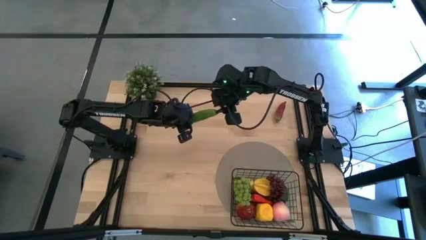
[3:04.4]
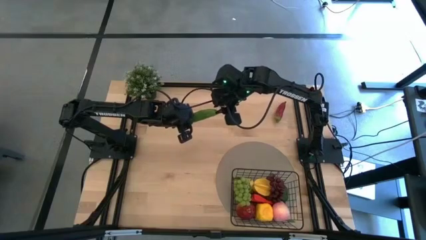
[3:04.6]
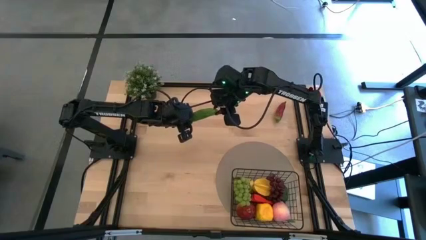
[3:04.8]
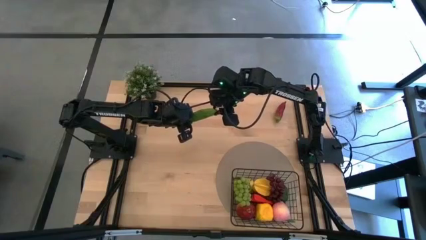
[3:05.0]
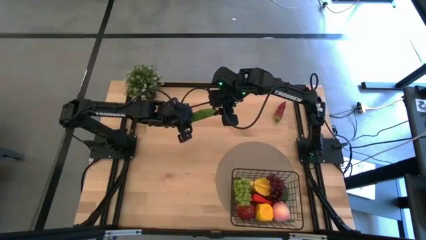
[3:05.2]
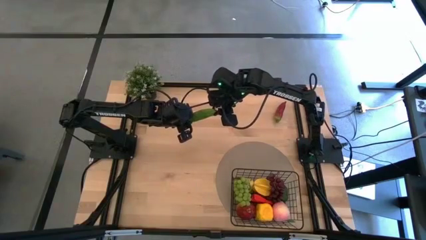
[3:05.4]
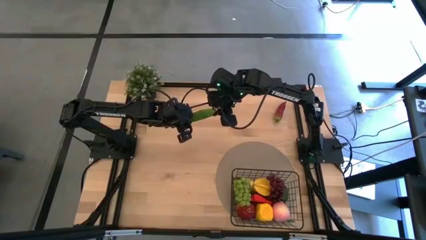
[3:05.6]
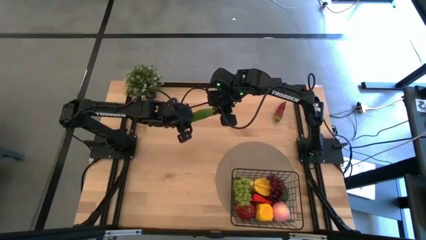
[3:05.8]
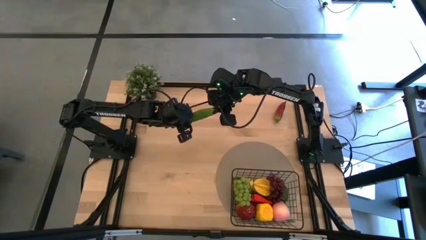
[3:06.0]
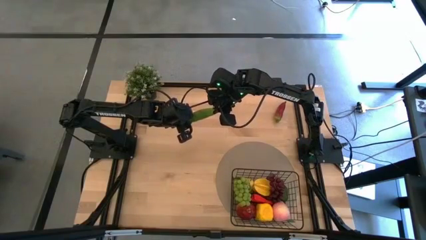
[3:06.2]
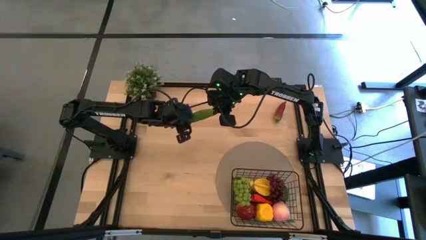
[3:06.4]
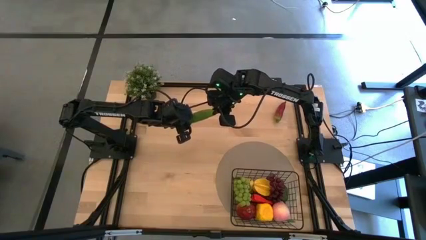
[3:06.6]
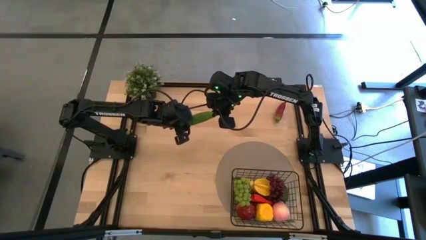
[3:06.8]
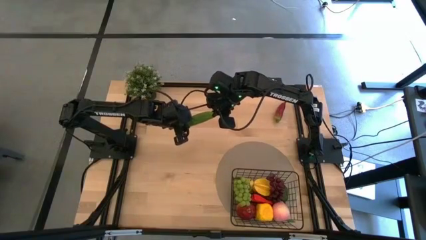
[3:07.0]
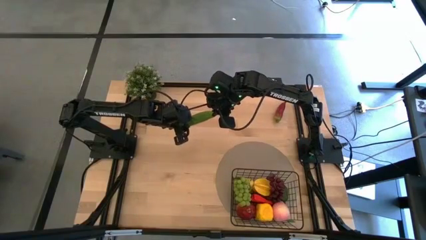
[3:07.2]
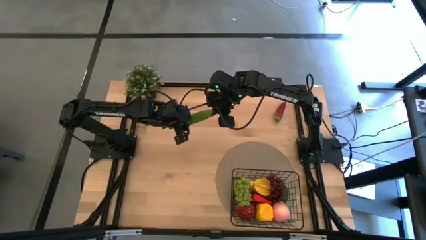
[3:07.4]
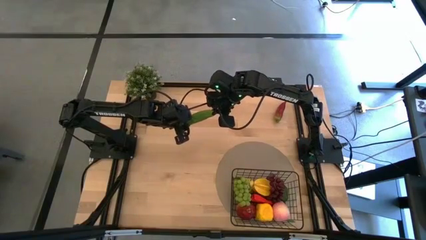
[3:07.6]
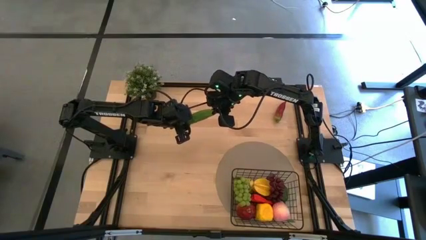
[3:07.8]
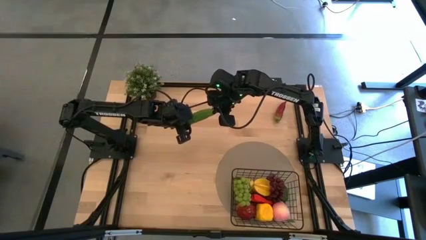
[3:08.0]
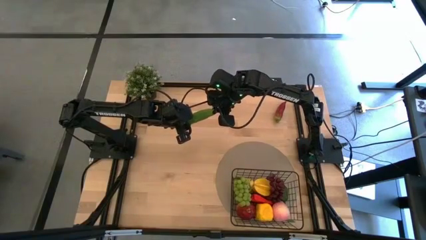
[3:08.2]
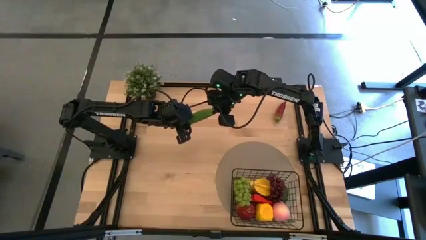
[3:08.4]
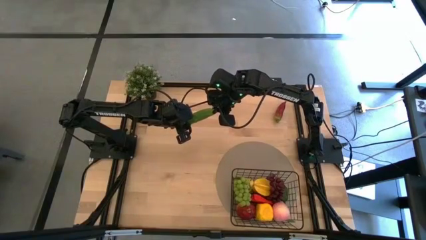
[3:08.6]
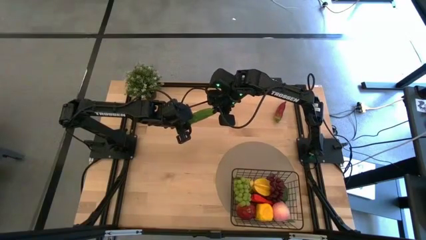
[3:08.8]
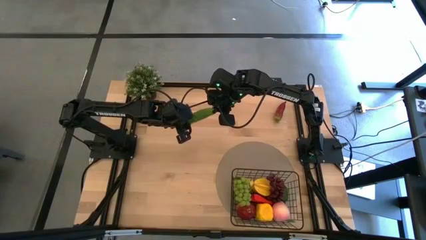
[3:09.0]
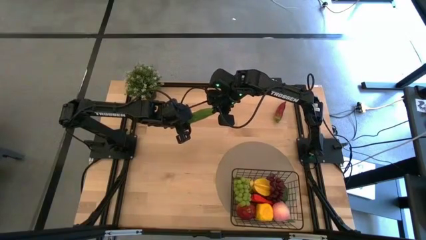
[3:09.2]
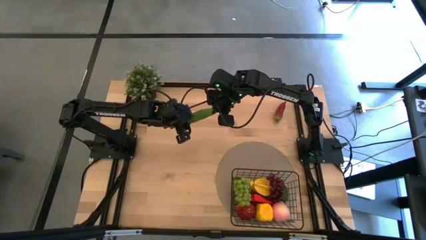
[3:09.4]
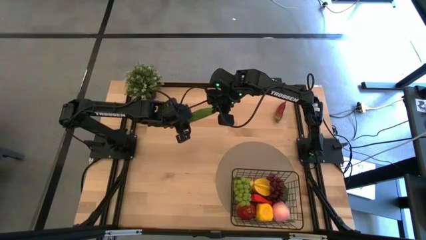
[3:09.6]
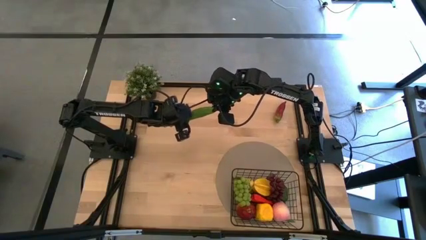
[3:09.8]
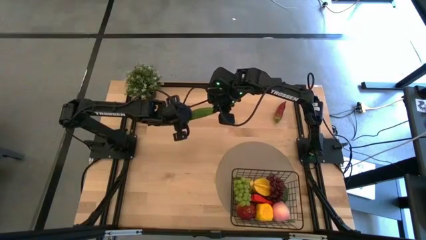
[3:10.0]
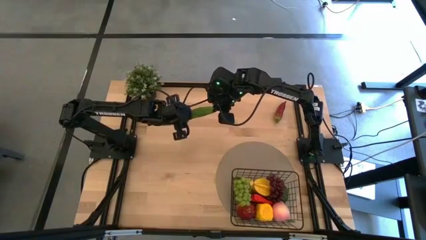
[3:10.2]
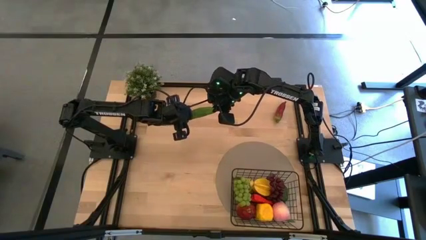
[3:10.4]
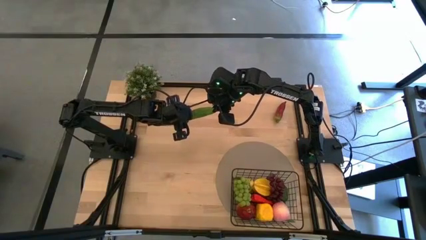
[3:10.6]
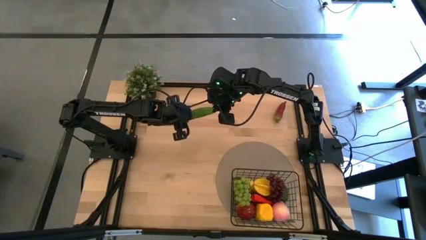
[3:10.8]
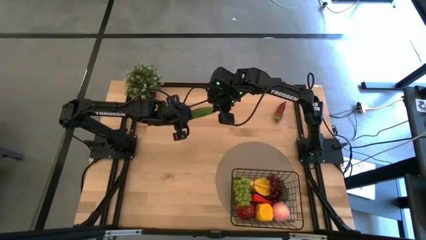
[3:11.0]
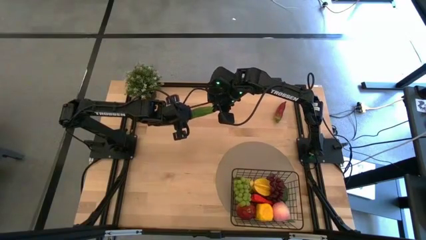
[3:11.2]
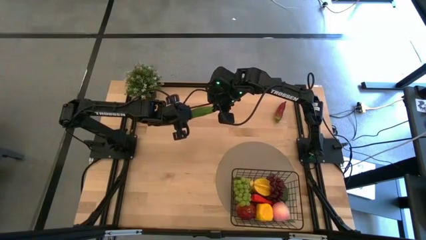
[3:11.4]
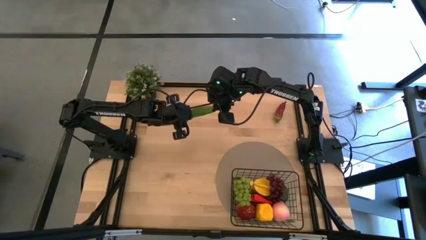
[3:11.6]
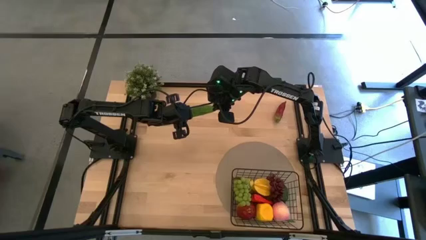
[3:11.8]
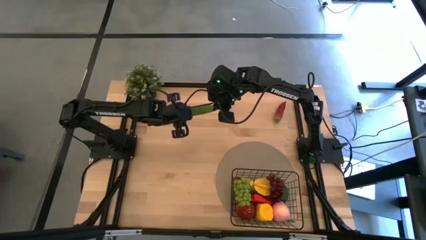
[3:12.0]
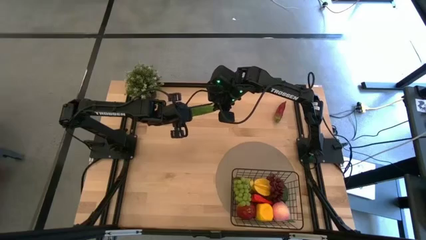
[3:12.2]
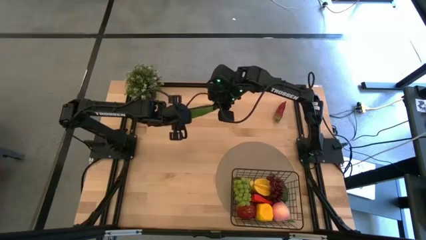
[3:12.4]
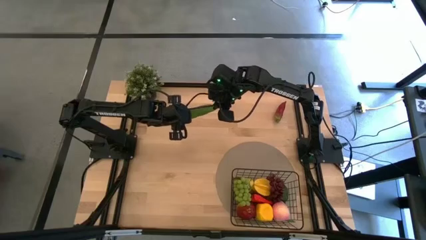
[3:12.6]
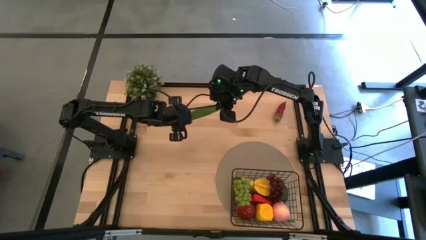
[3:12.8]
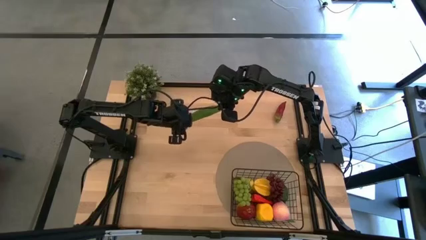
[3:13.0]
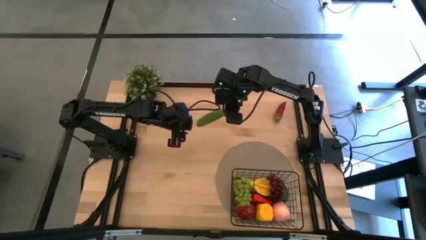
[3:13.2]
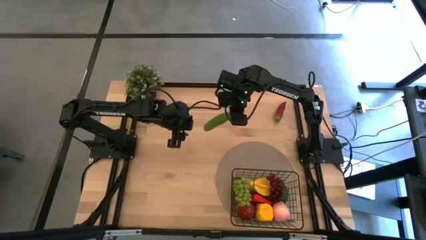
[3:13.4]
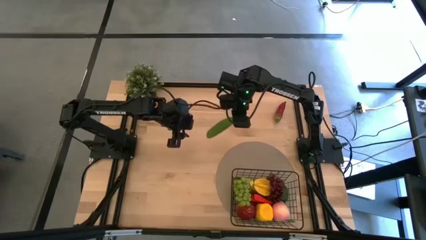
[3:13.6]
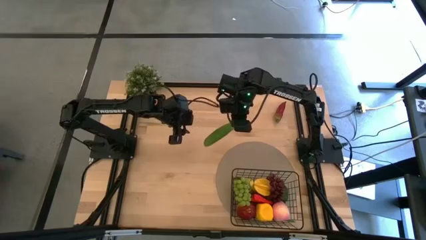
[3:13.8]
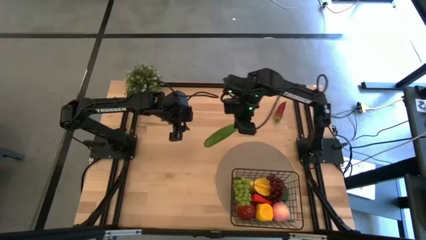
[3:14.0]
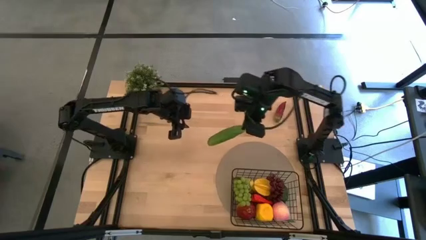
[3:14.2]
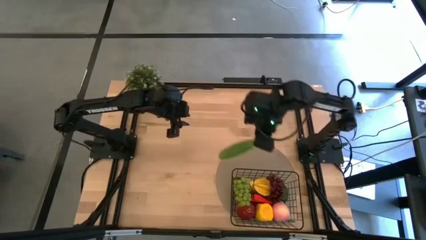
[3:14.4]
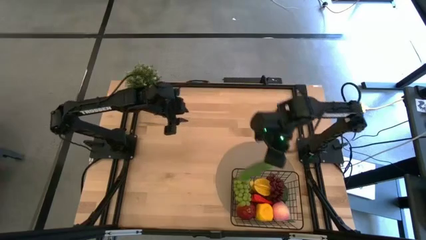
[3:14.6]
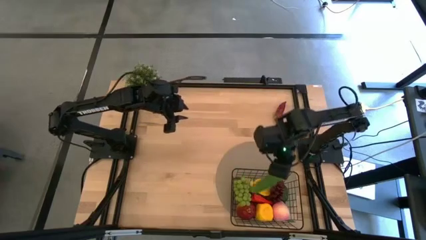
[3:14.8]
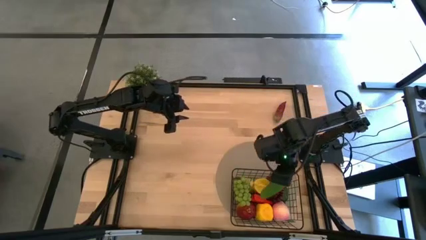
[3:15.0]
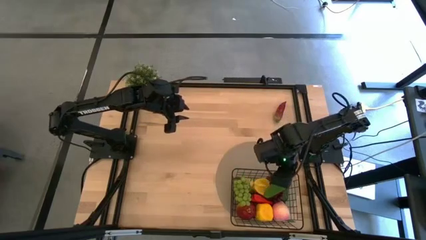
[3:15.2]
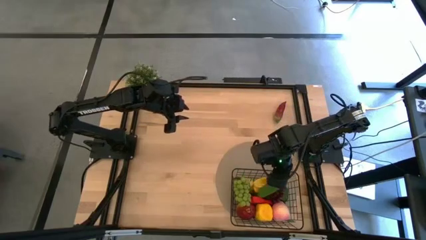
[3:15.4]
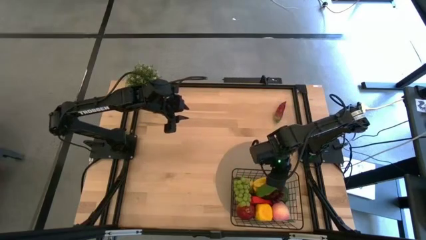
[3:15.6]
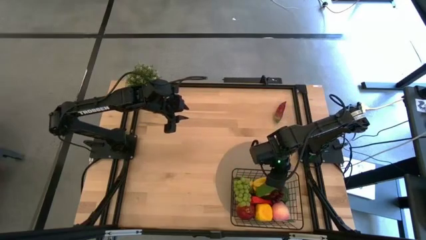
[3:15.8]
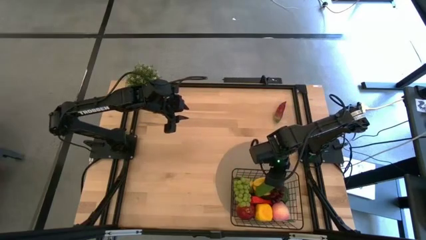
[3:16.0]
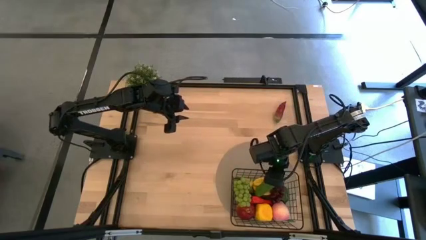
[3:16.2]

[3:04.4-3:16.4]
Task: Build produce basket
Put the green cucumber into the wire basket

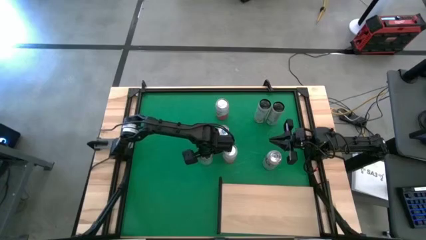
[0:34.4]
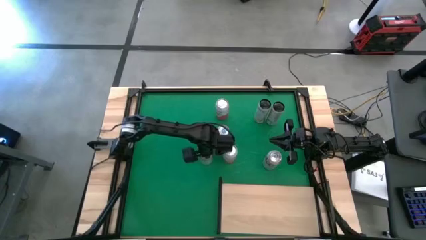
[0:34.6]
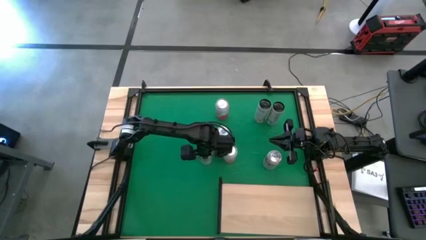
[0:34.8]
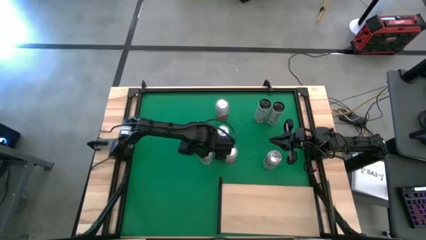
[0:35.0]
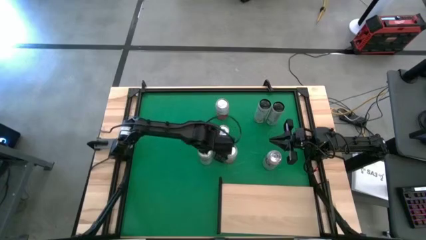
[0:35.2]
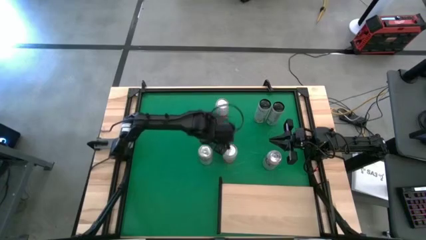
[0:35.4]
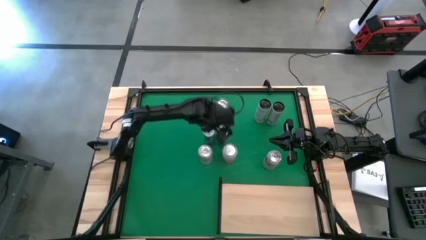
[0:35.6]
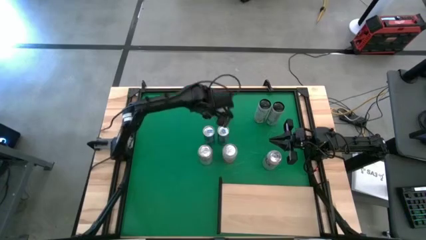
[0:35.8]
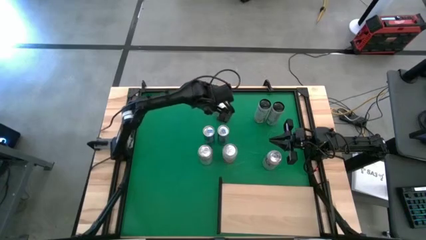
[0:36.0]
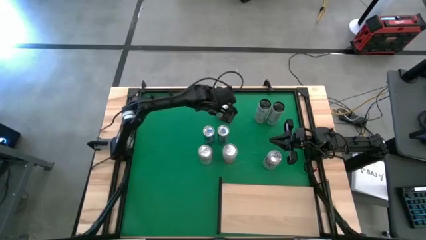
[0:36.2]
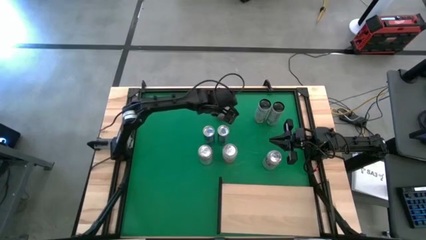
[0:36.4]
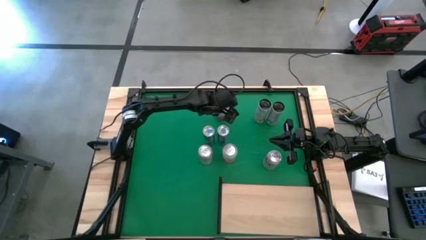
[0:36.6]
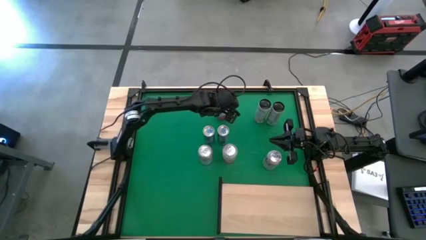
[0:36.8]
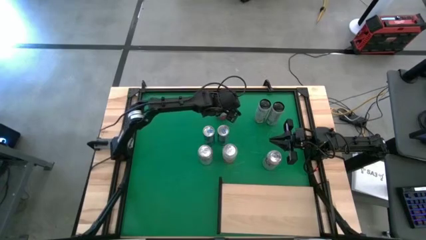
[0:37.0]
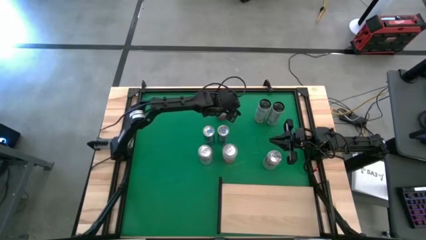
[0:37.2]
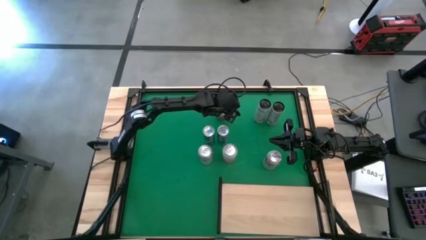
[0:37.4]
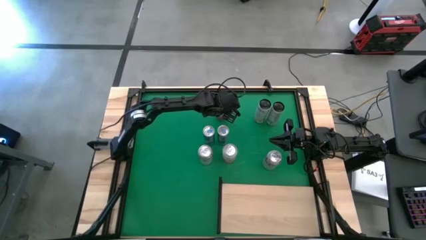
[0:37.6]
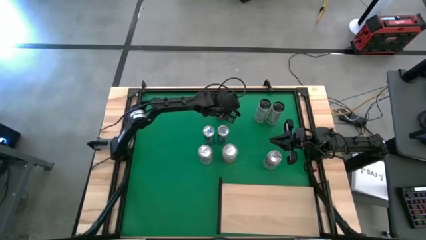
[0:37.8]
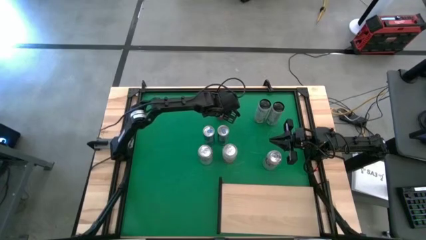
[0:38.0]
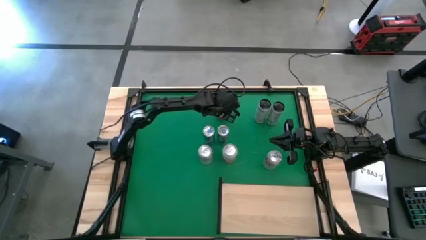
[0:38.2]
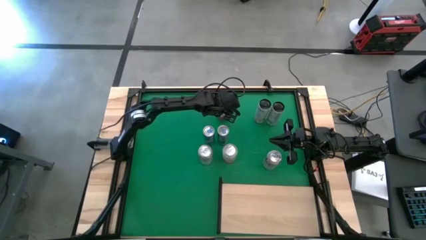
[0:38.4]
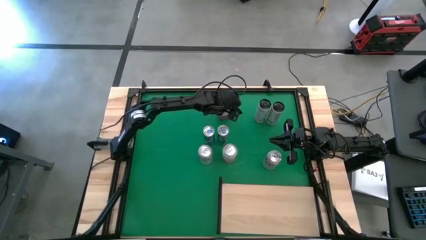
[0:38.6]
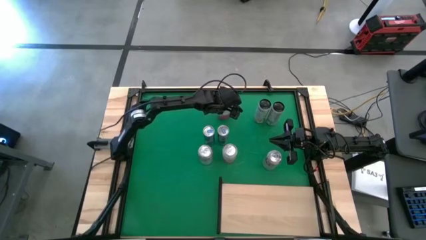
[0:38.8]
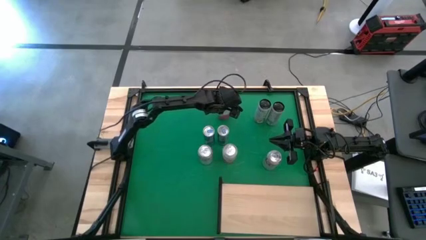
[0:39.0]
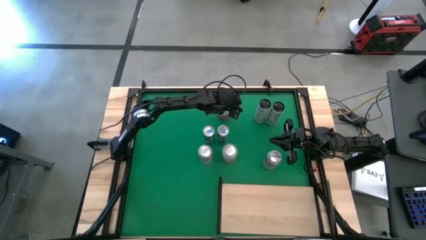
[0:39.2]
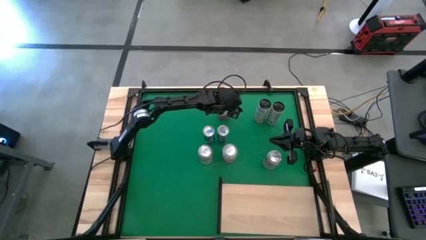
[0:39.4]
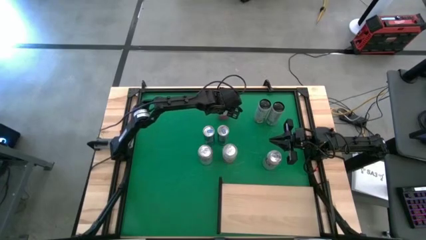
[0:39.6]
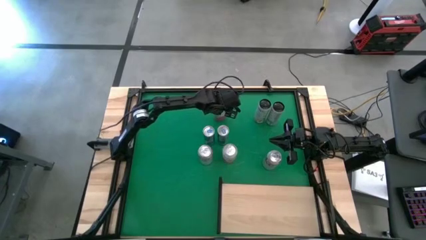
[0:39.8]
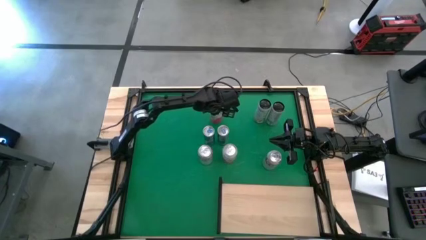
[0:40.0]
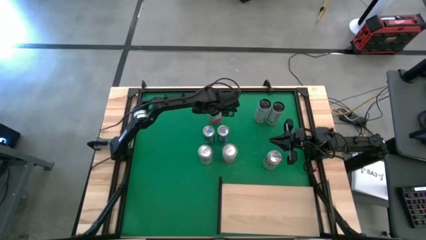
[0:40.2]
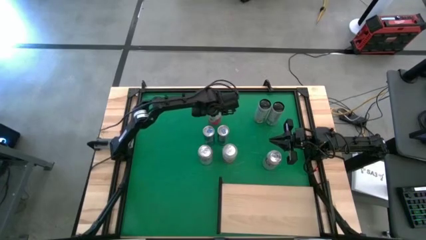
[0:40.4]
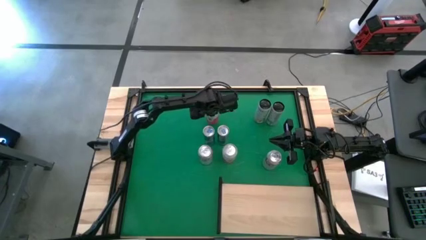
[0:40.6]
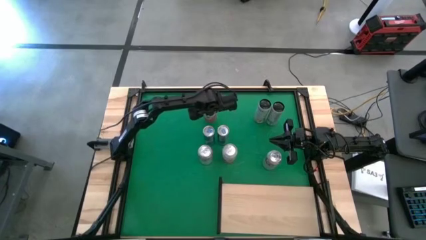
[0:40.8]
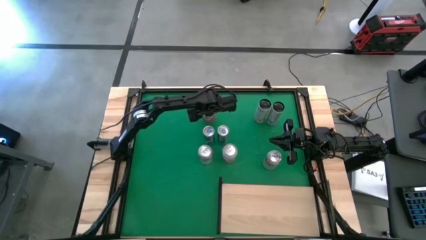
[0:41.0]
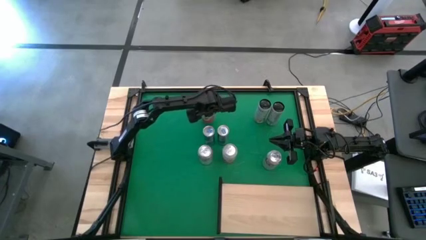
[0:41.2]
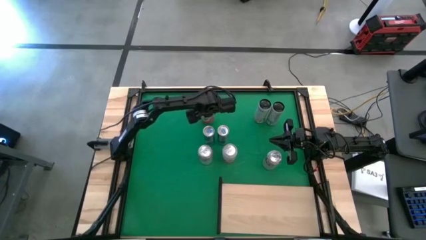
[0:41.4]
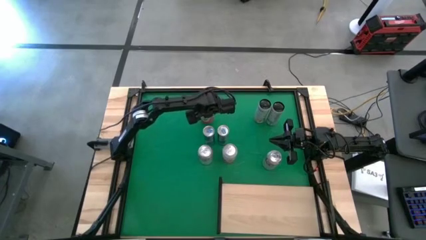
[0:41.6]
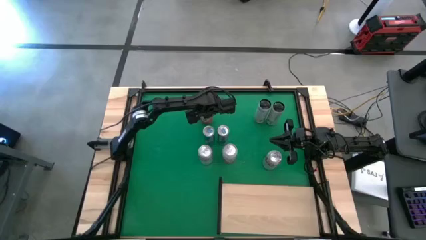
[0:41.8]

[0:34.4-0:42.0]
Task: Place canned beverage on shelf
Move the top Pink-white soda can to the center of the table
